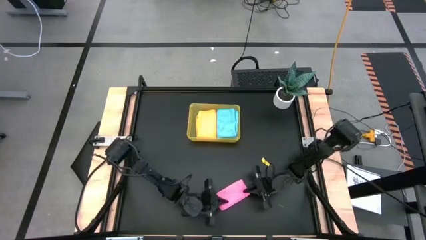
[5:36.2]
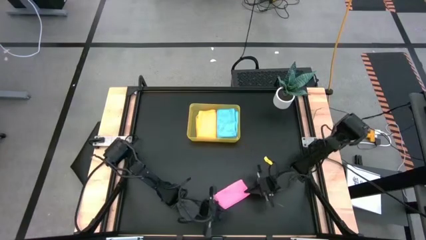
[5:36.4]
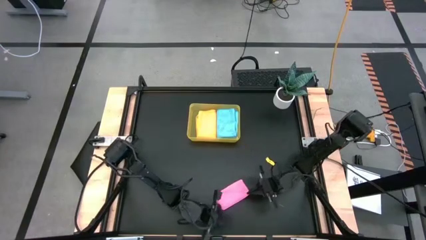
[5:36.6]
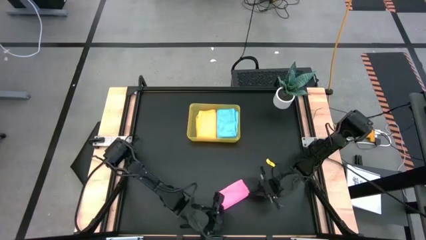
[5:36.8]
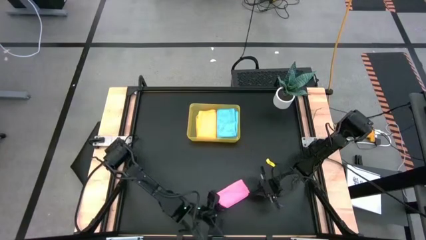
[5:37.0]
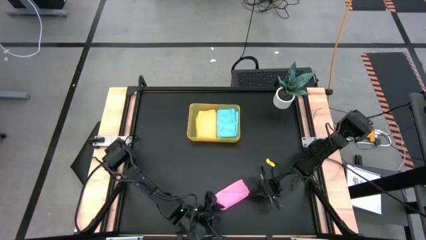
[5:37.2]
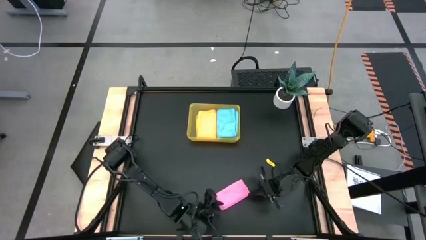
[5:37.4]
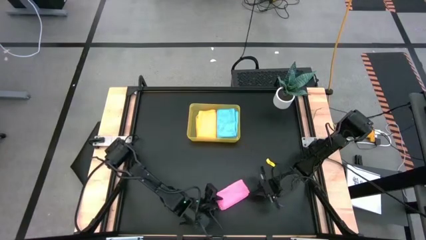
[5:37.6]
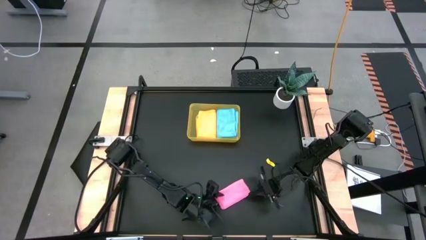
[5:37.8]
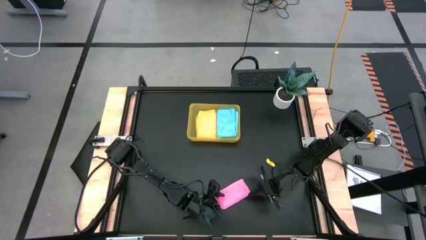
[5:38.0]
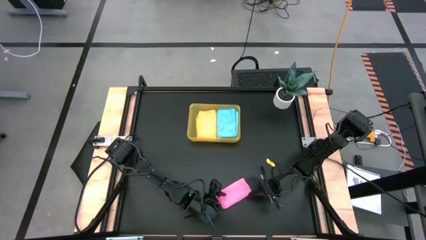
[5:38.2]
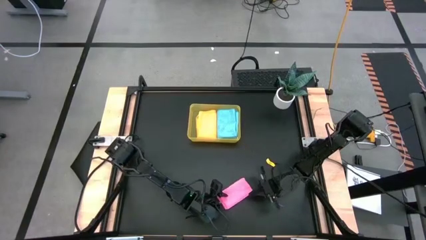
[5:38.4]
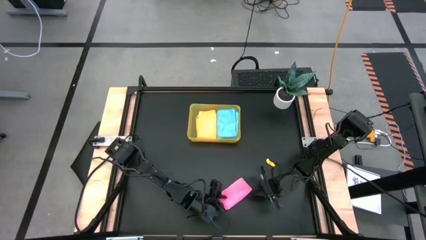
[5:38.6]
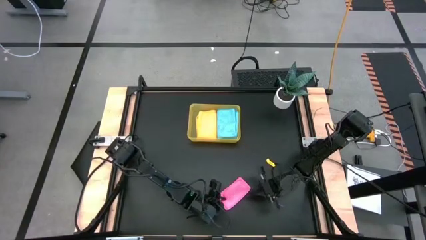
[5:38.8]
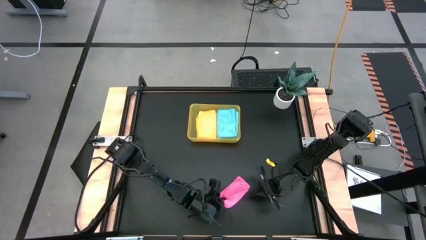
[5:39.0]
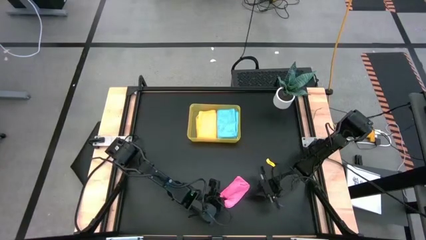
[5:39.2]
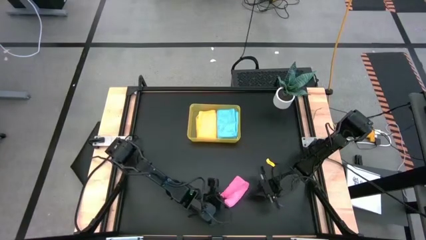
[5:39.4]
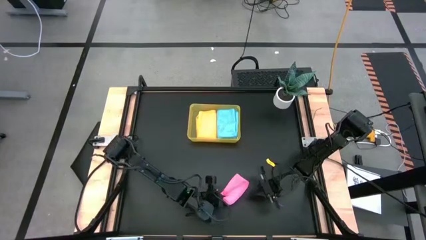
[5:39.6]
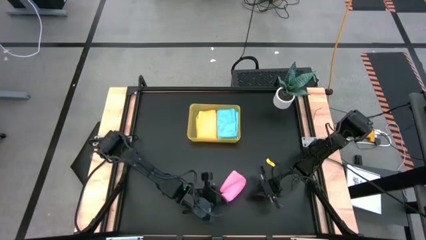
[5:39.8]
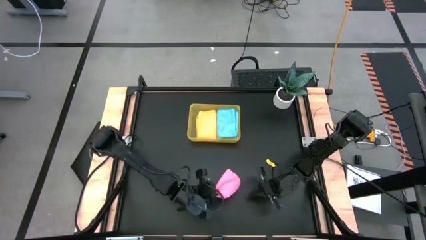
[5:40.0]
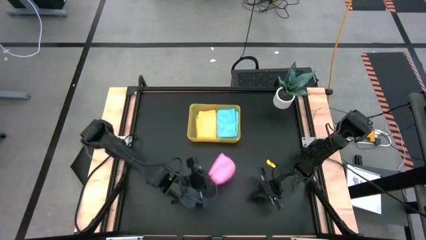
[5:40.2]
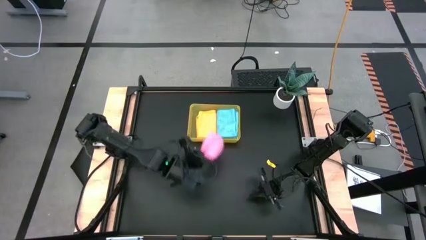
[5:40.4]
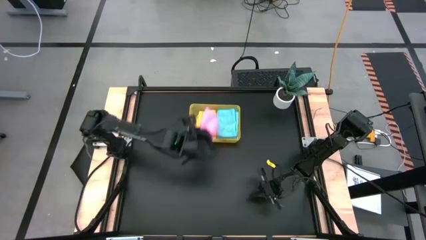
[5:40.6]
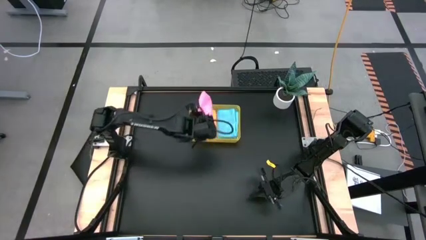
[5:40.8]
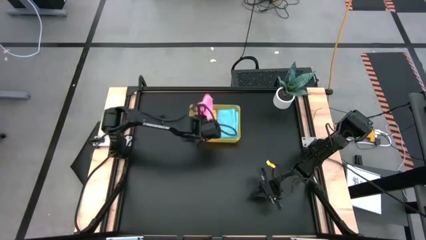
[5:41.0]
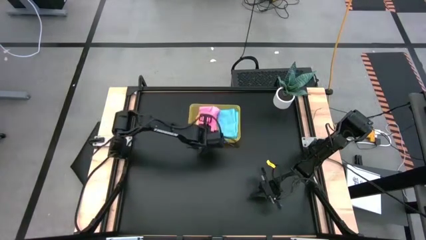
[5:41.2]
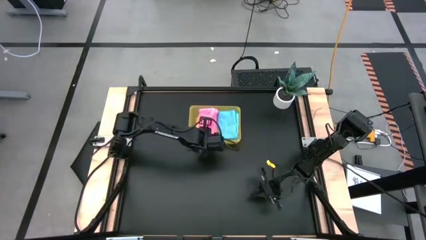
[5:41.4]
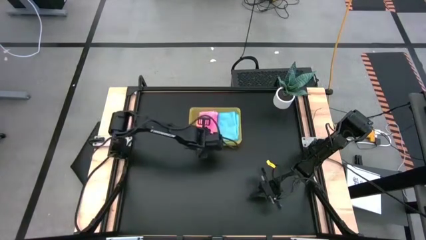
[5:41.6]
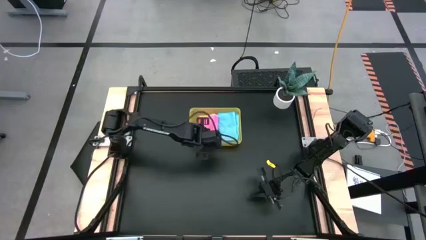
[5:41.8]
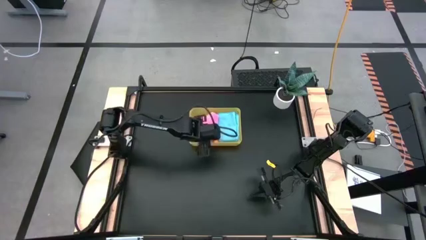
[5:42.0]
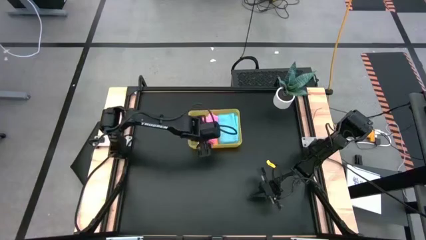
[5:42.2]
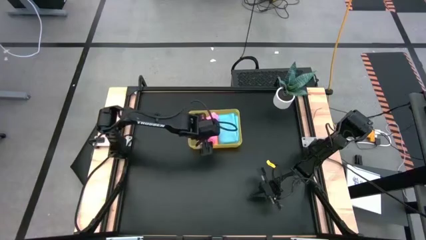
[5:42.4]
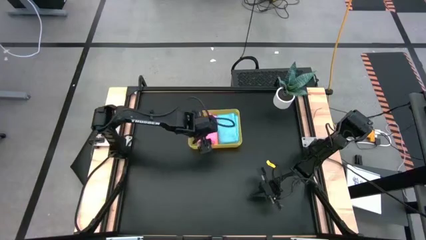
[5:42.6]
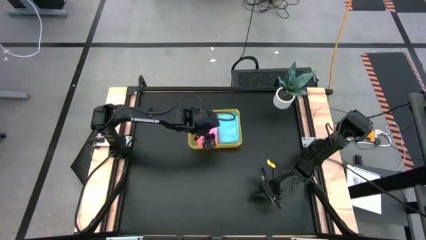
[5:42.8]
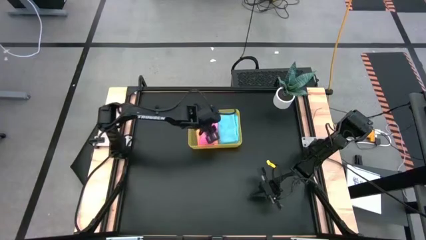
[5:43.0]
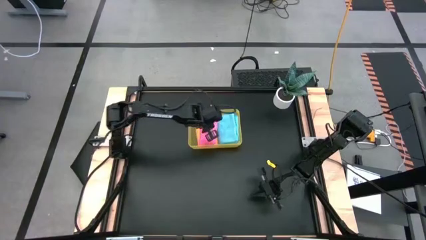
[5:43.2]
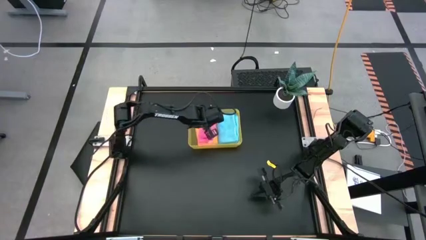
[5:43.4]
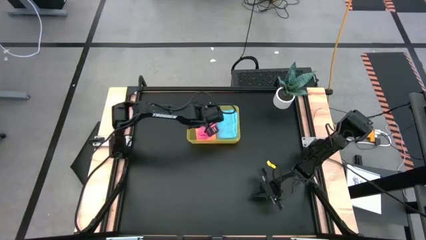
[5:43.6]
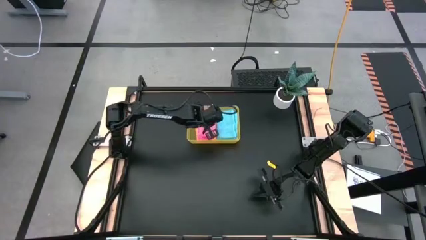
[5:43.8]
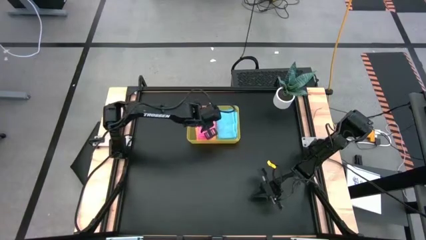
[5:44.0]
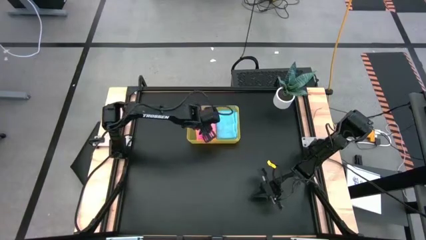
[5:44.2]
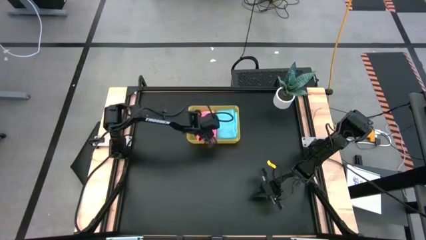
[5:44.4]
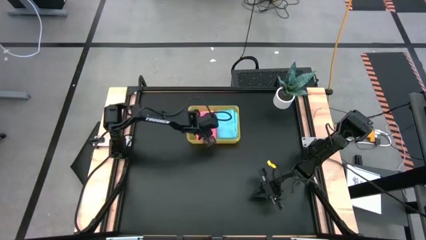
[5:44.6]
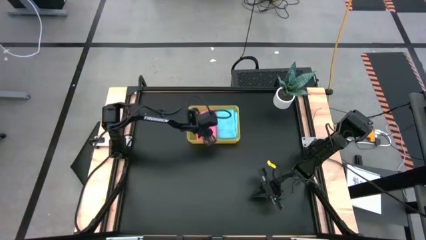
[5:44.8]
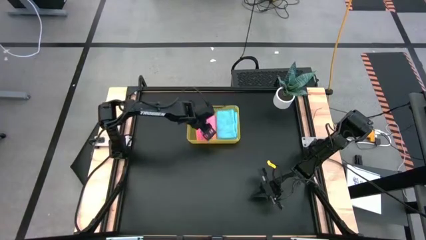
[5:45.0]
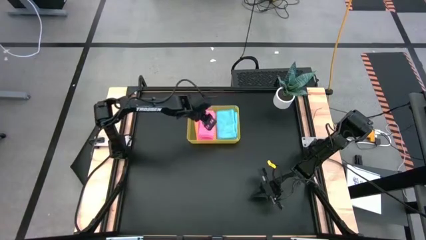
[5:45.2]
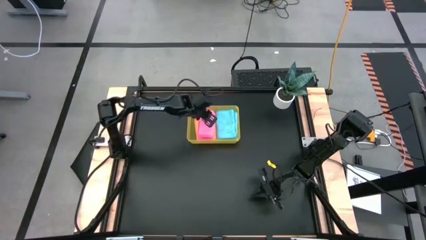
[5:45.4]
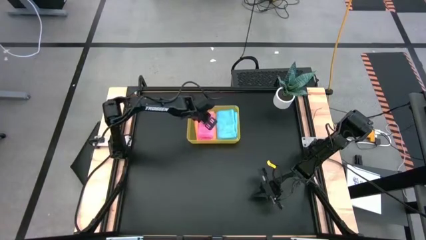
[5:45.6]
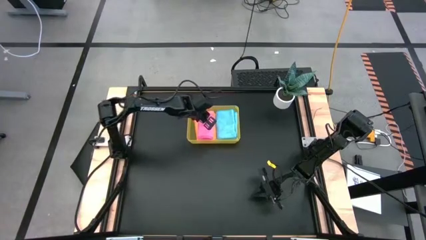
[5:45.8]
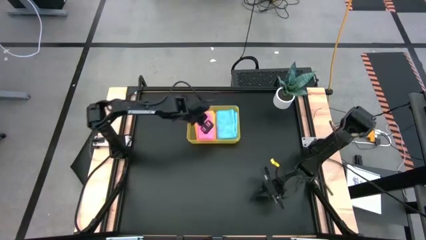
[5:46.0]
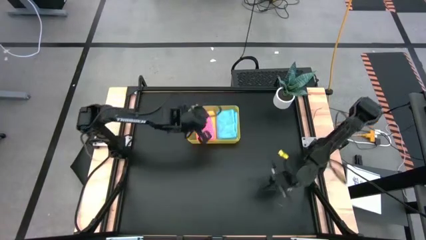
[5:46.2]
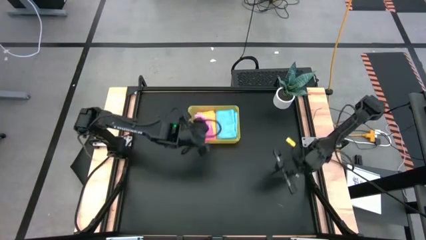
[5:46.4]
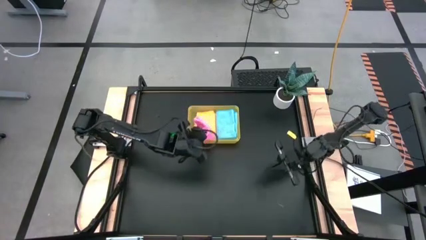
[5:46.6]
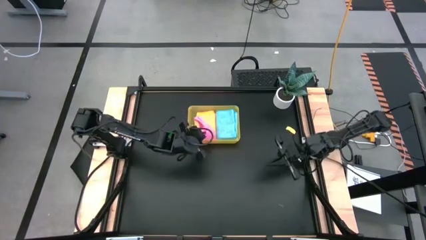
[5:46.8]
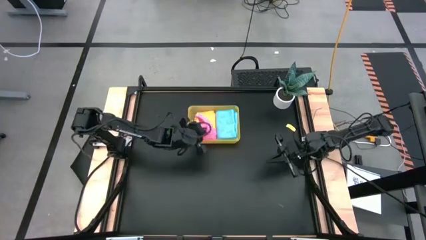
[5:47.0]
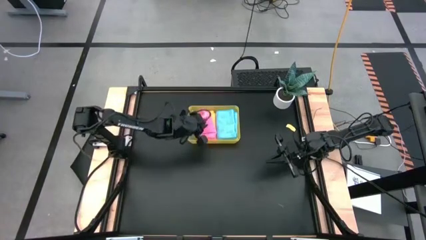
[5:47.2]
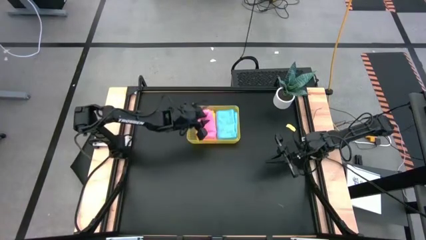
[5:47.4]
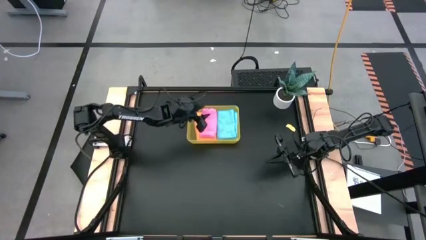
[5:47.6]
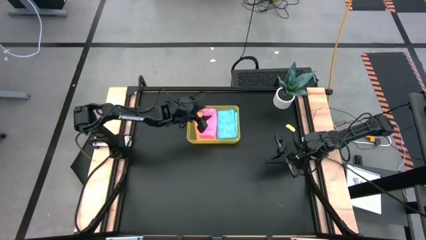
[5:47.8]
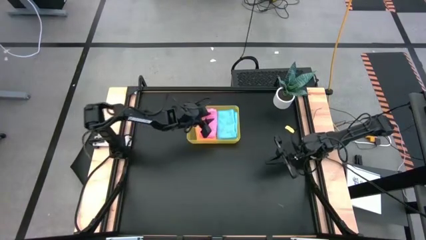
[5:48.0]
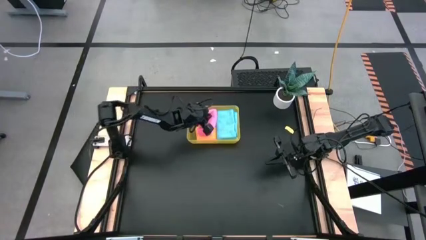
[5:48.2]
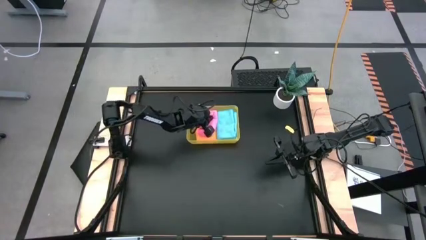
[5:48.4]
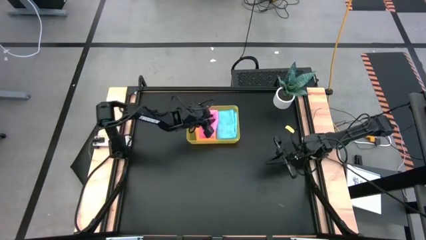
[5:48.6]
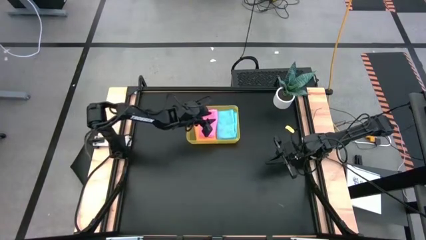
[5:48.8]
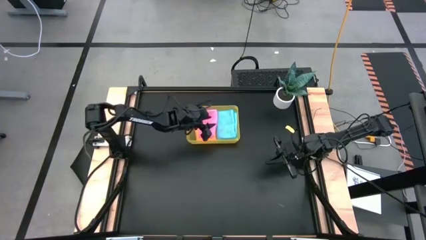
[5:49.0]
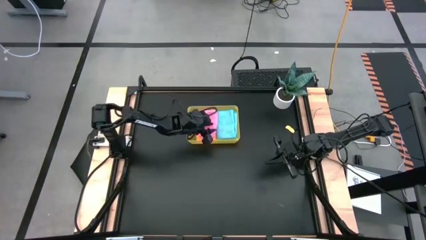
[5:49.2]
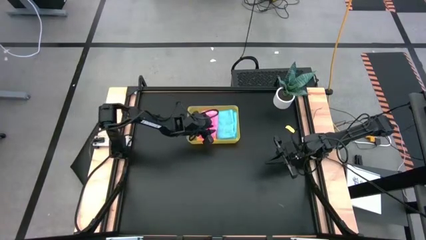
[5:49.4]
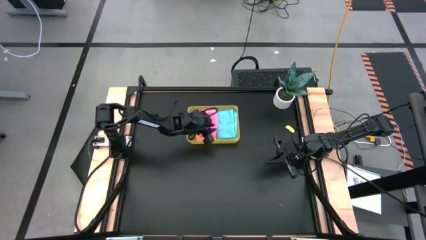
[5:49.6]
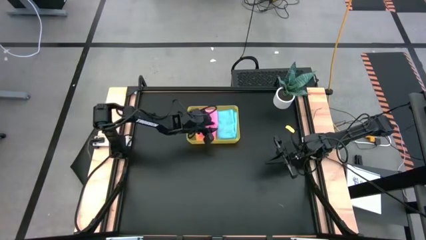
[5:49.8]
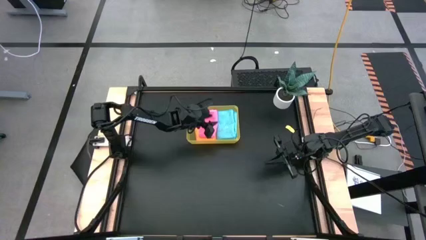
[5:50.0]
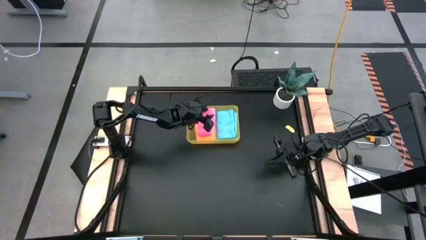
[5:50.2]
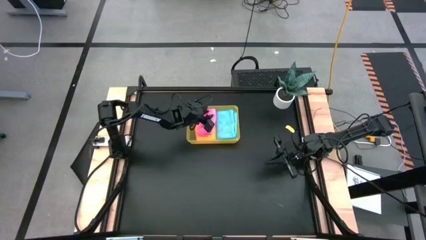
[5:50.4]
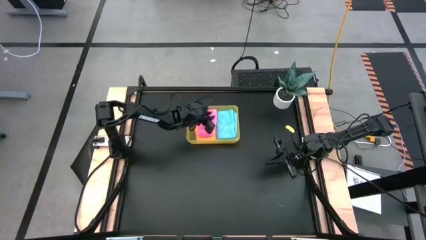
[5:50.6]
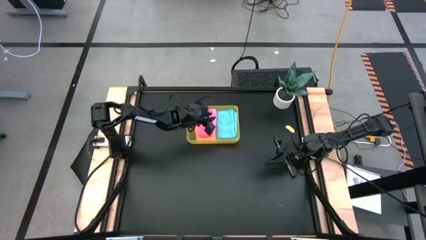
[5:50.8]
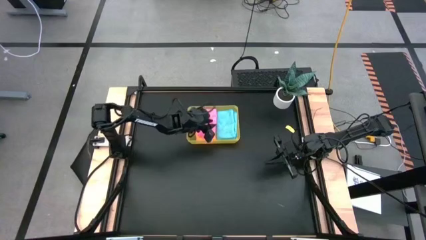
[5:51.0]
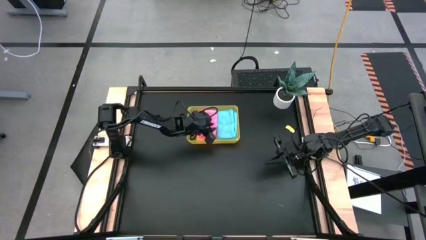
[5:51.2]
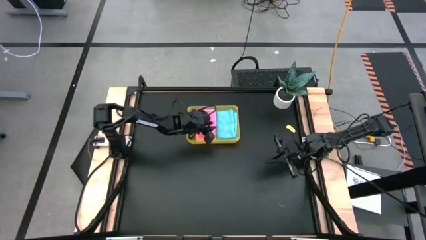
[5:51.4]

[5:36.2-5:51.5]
Task: Fold microfiber towels
Put the pink folded microfiber cloth in the yellow bin
